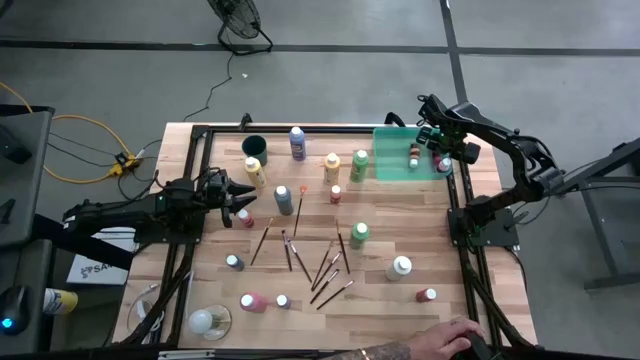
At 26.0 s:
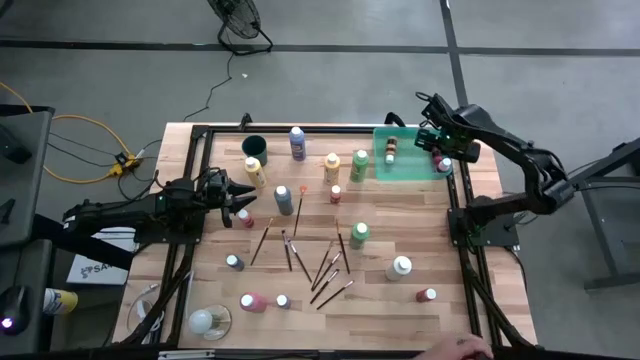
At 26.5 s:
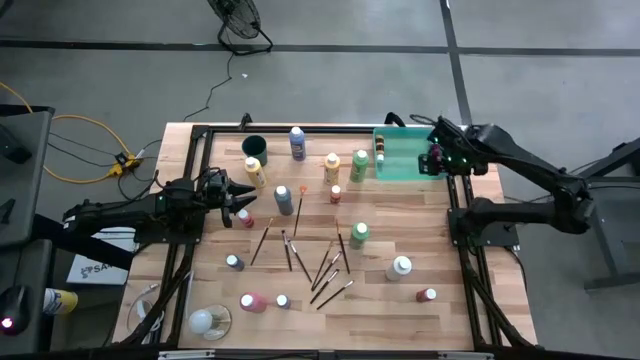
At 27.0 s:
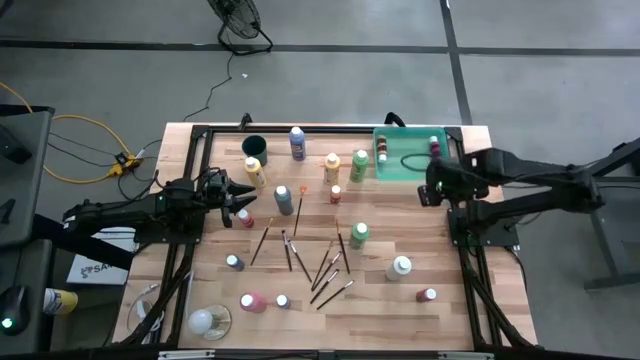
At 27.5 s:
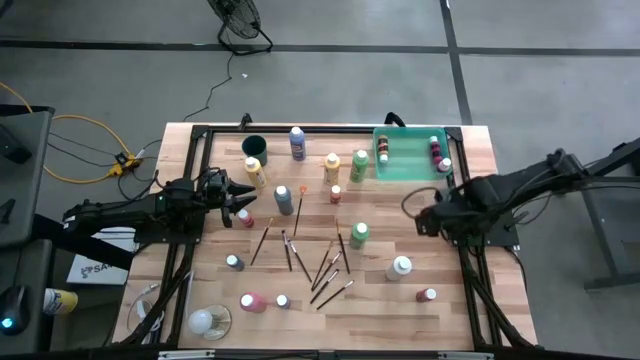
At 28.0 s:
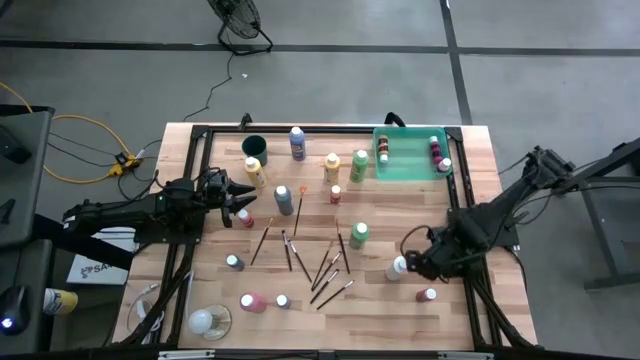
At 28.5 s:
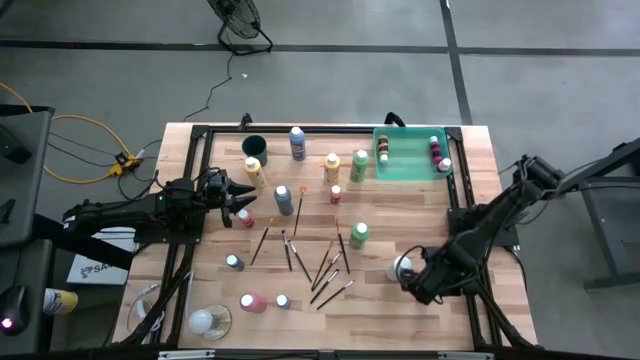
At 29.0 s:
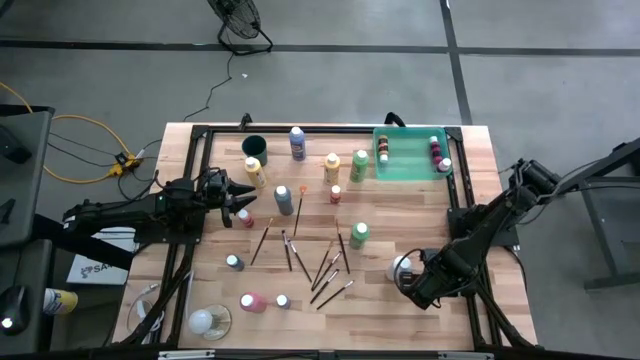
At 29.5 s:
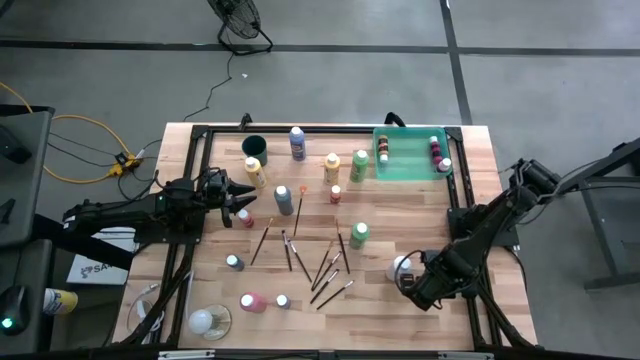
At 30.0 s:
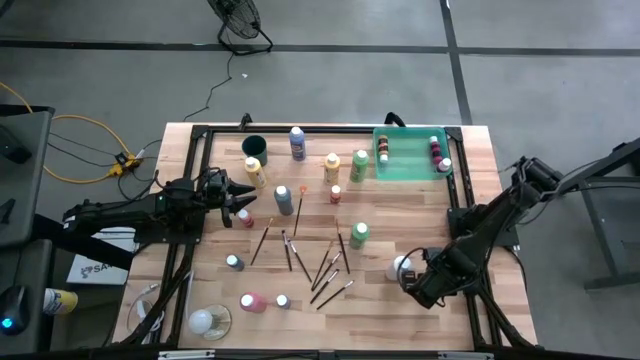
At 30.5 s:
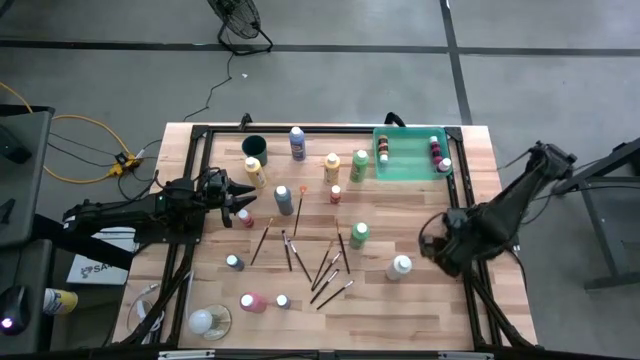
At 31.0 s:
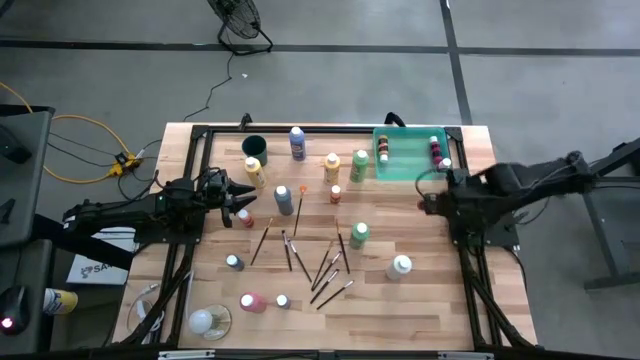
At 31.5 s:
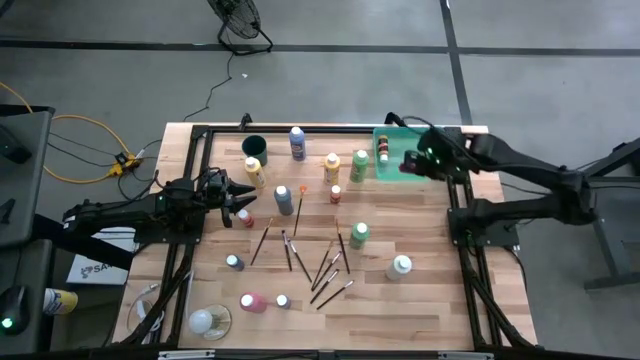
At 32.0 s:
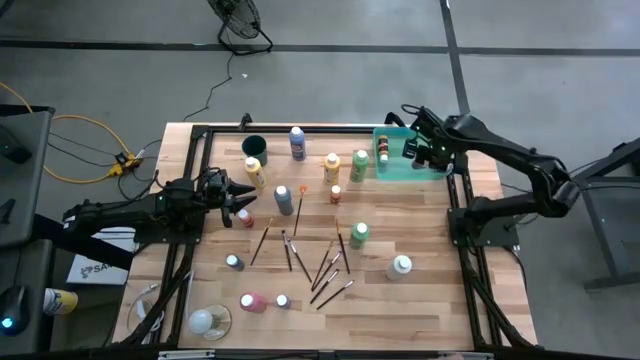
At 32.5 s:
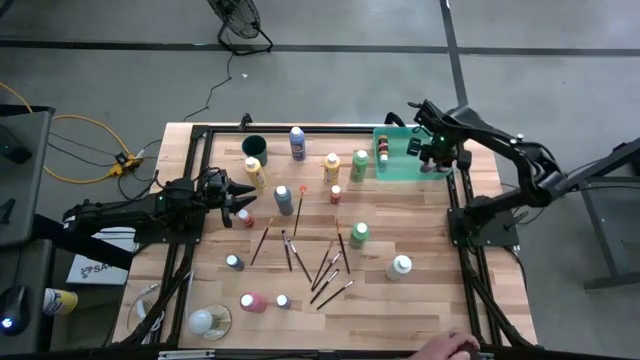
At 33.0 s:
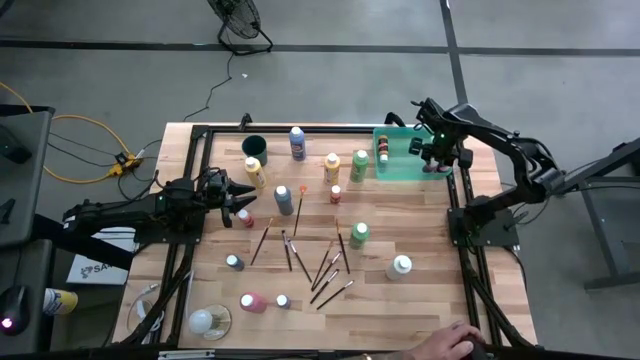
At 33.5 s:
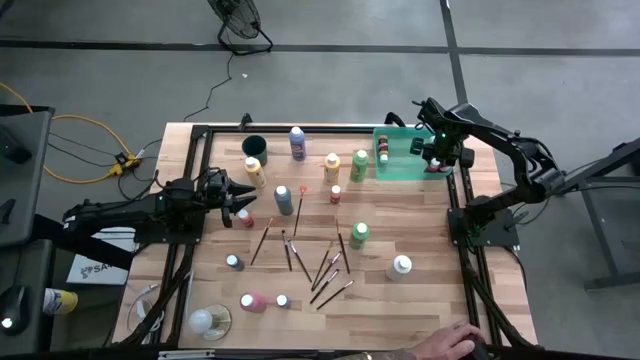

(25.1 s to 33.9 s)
Task: Pick & Place Paint Supplies
Put the small red paint bottle into the green bin

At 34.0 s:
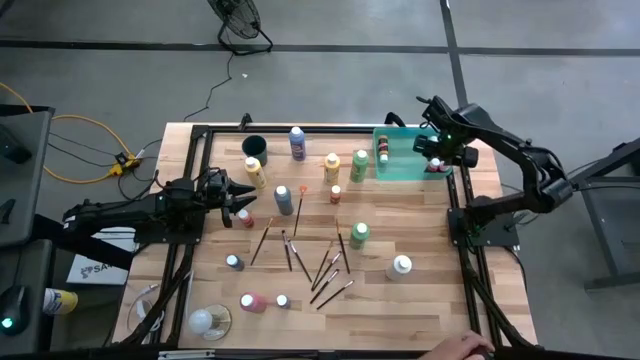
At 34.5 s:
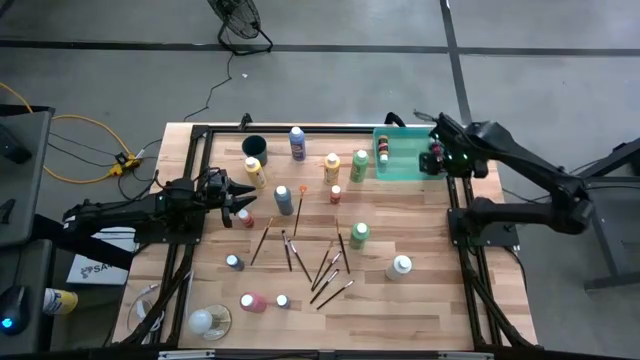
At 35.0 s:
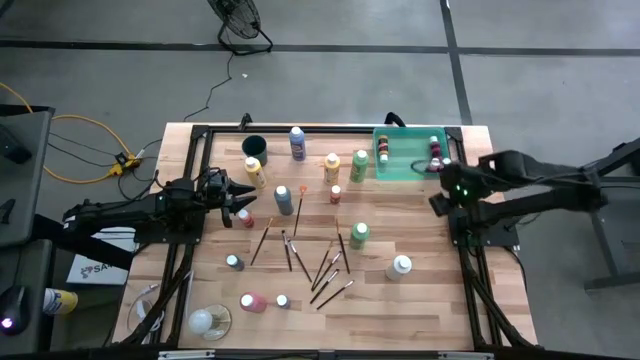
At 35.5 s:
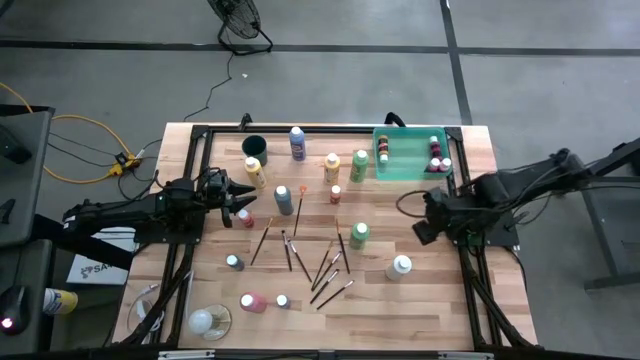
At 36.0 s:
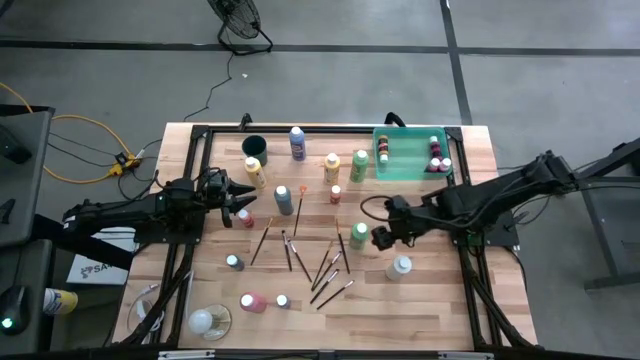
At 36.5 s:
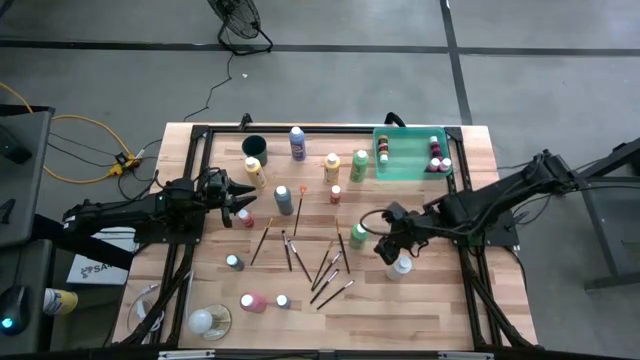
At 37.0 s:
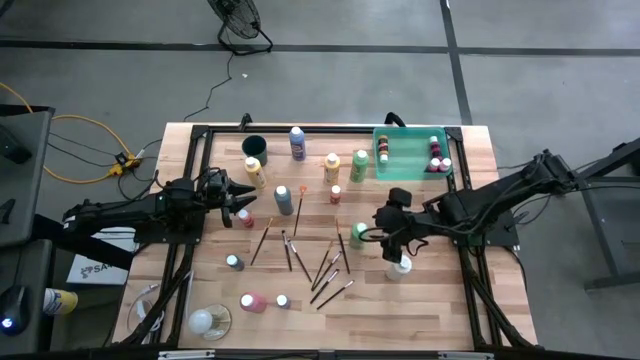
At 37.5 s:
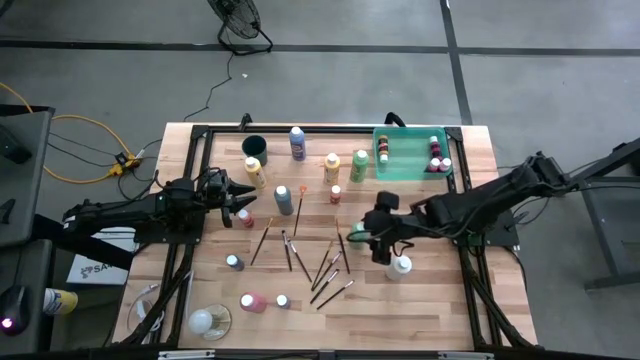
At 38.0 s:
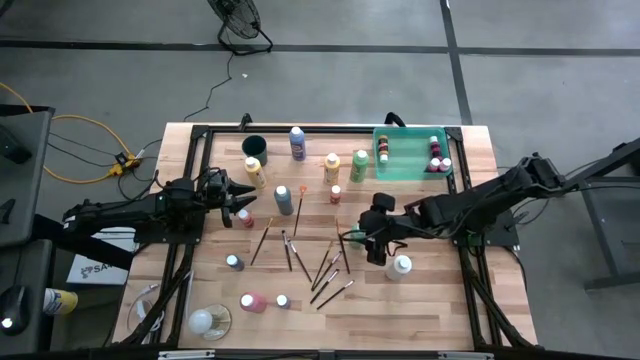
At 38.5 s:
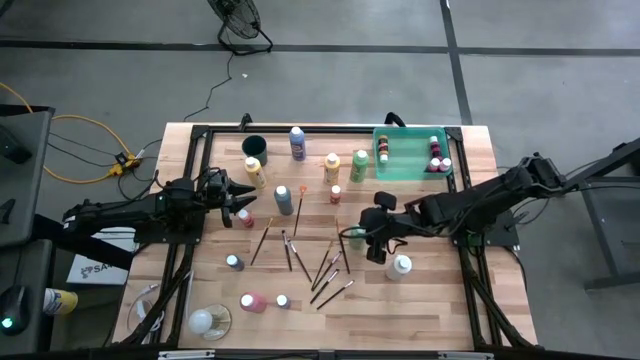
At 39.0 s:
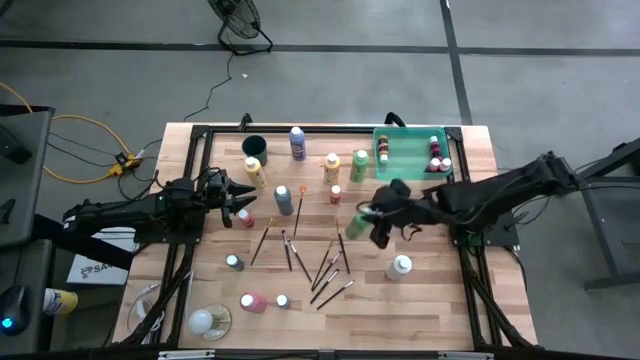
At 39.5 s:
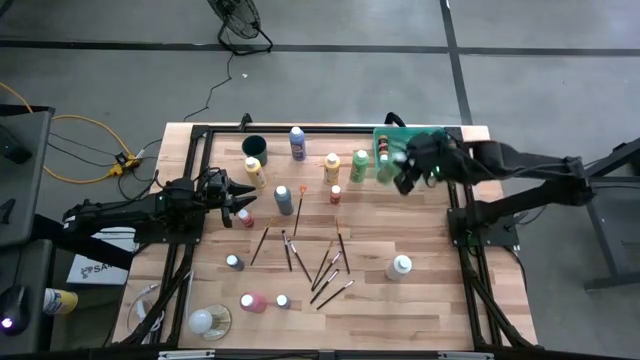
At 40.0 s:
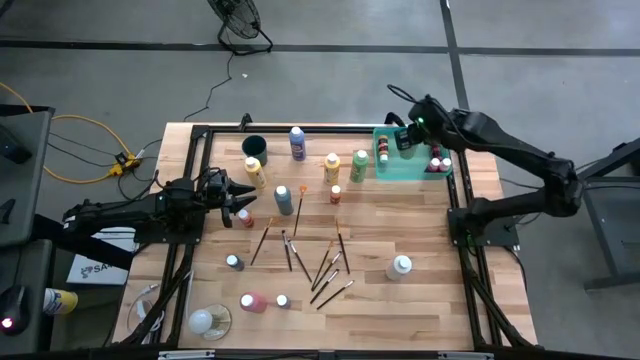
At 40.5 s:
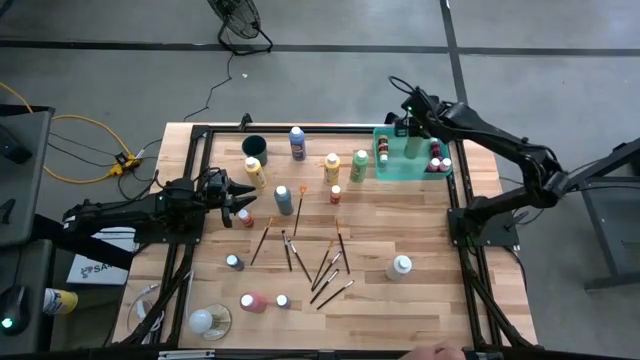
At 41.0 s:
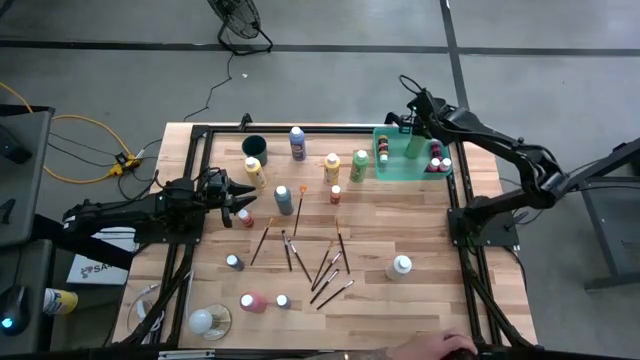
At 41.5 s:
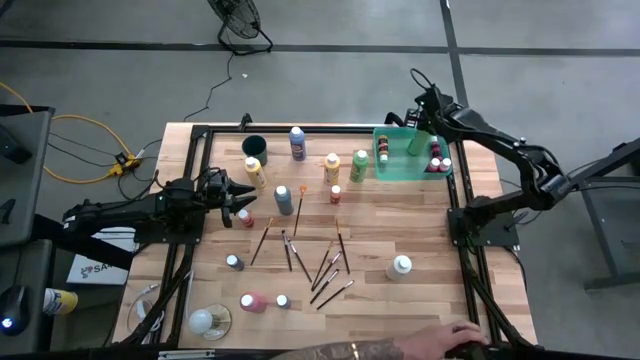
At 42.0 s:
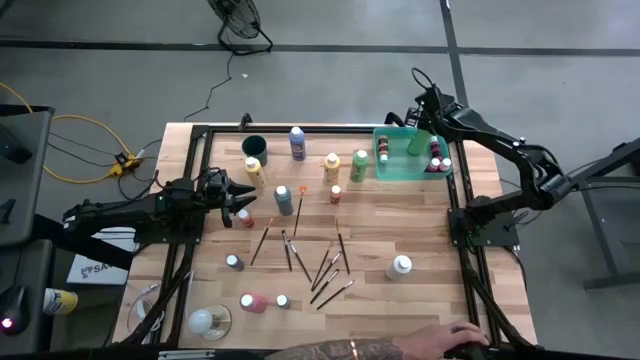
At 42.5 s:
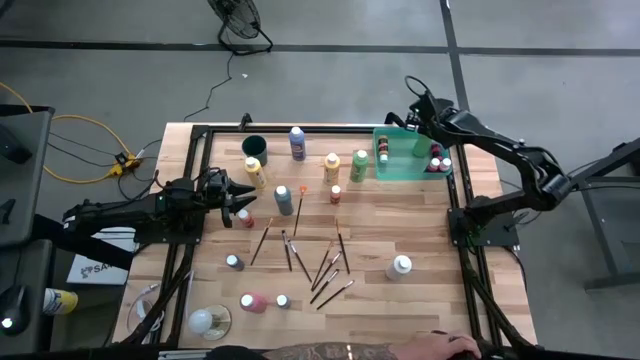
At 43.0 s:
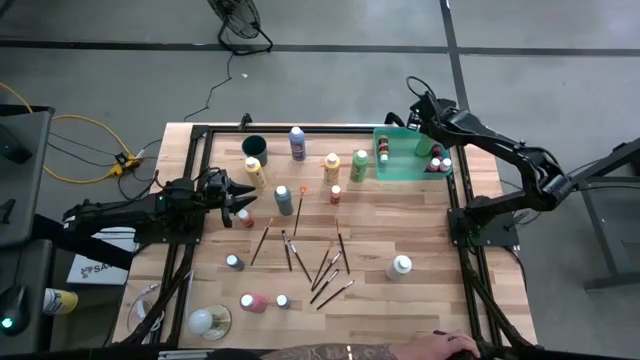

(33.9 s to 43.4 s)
Put the big green paint bottle into the green bin

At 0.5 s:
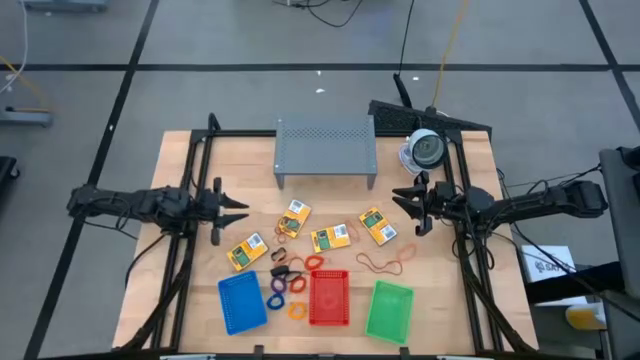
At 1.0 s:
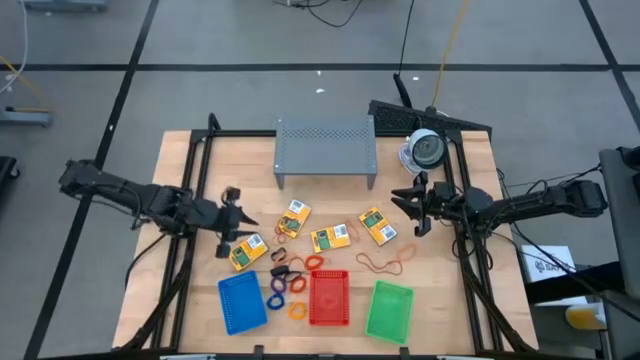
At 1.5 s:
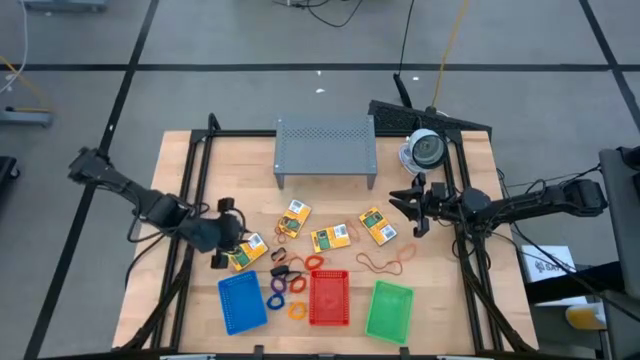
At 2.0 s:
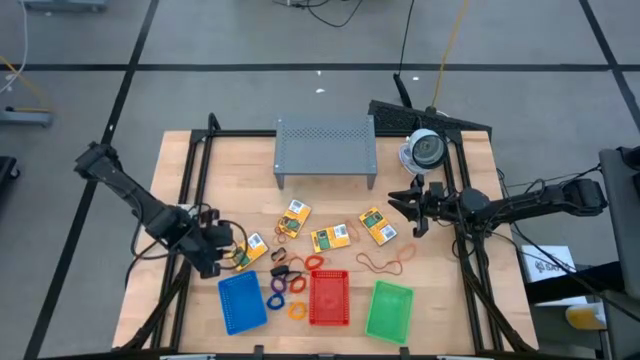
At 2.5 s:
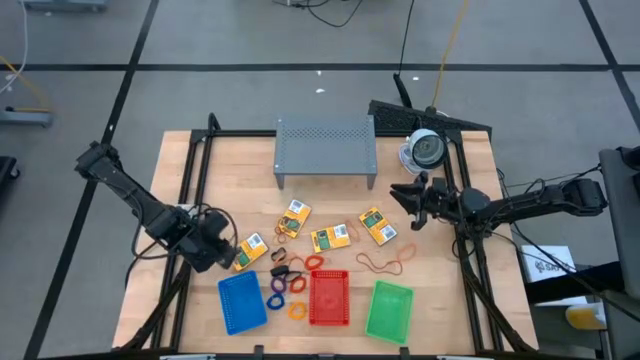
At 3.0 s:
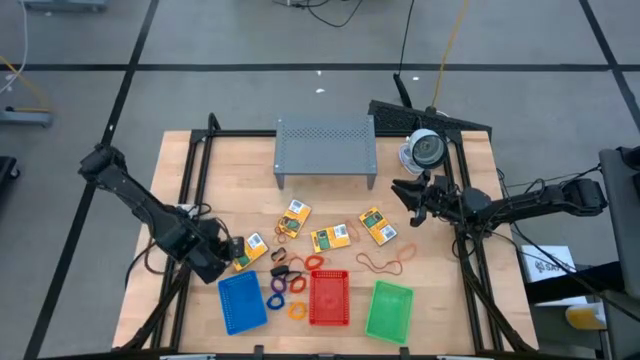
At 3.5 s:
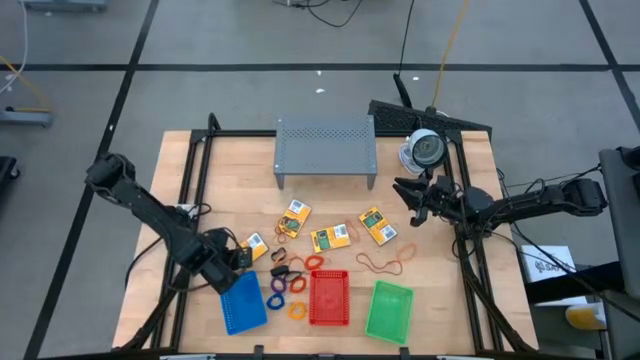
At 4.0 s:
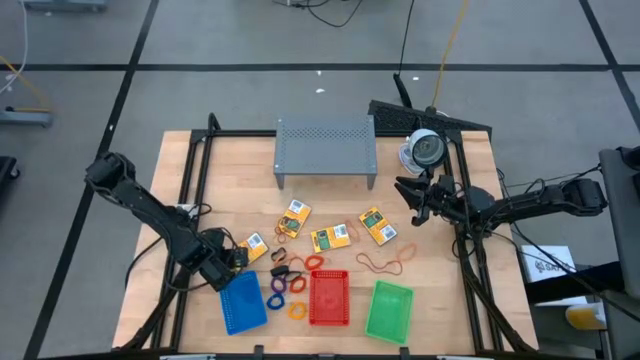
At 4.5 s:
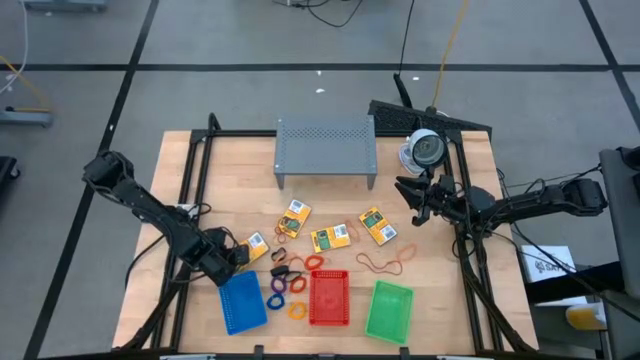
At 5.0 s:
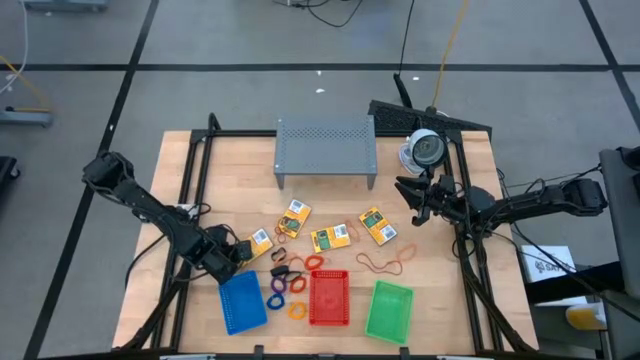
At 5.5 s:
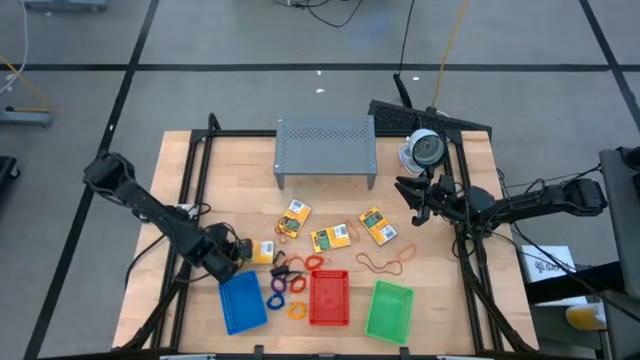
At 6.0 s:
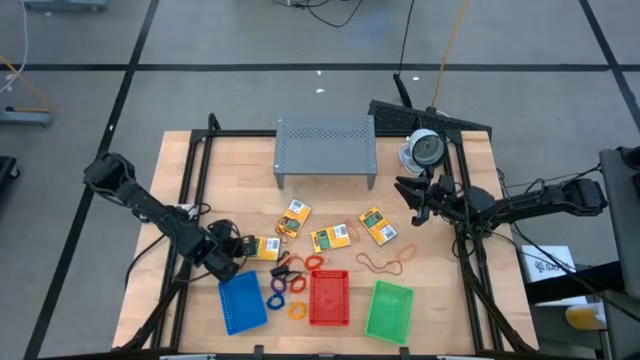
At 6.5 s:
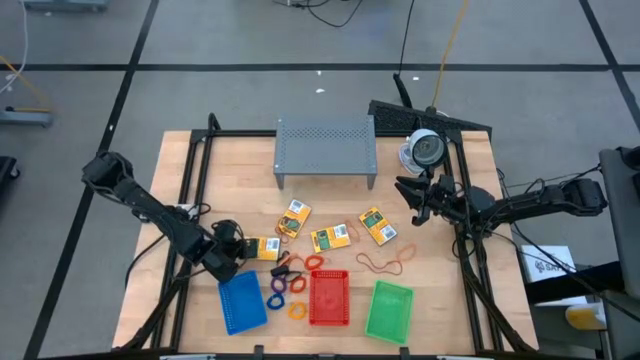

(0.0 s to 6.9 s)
Task: Pick & Place Office Desk Supplies
Put the crayon box into the blue bin
